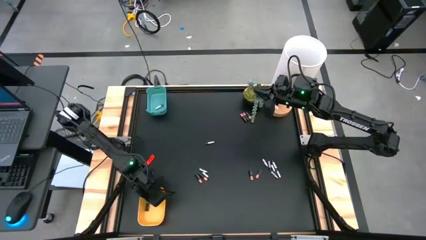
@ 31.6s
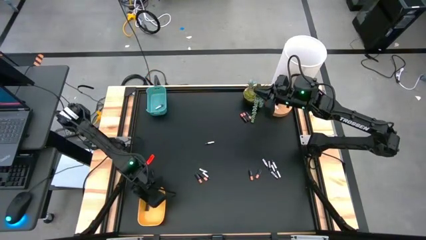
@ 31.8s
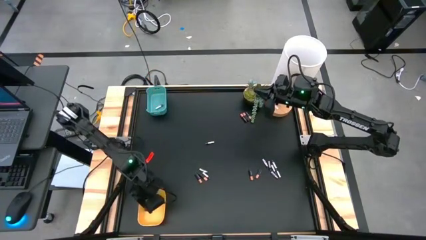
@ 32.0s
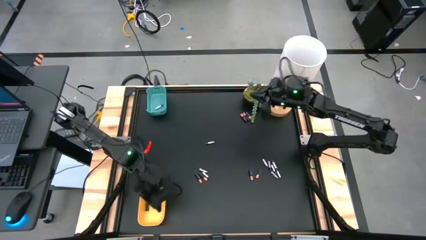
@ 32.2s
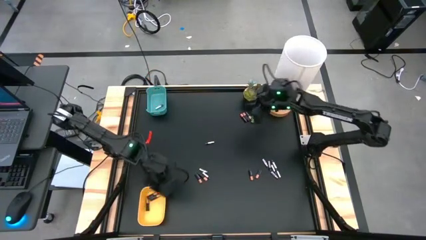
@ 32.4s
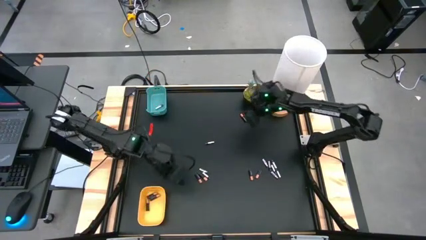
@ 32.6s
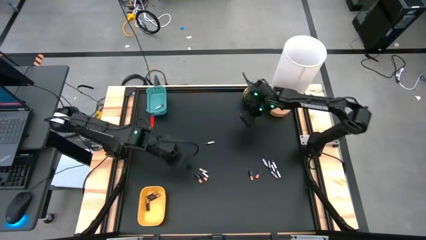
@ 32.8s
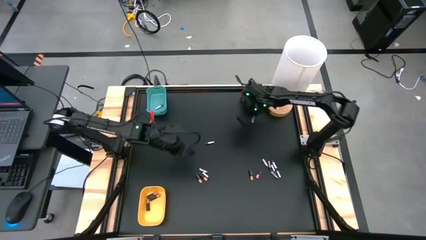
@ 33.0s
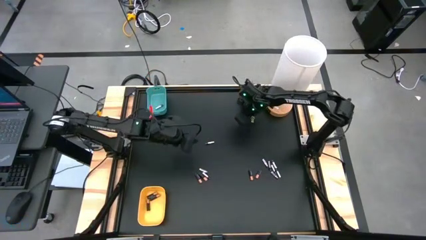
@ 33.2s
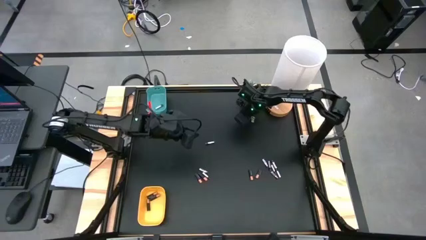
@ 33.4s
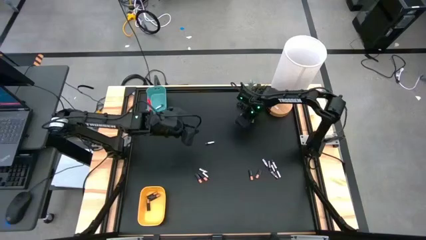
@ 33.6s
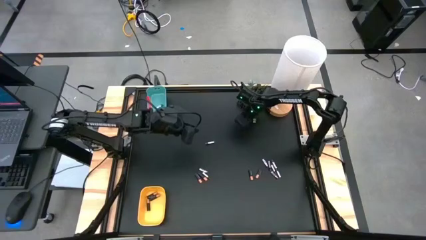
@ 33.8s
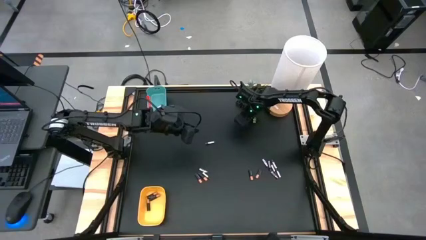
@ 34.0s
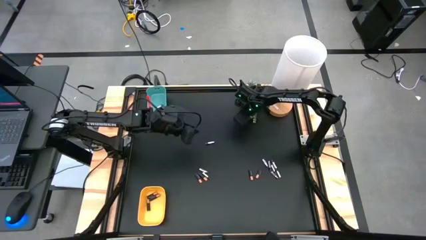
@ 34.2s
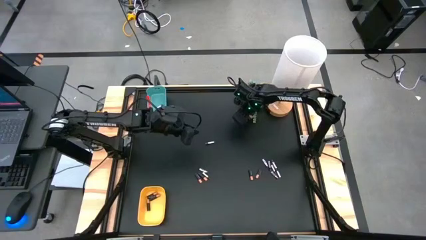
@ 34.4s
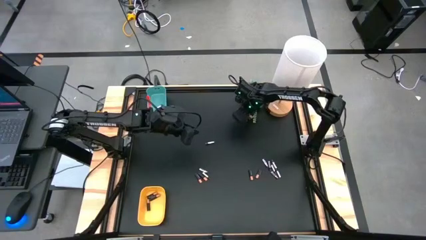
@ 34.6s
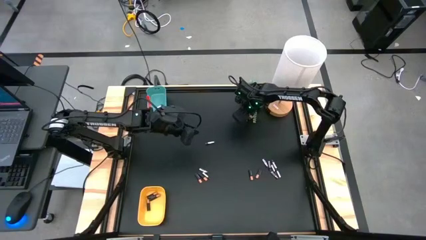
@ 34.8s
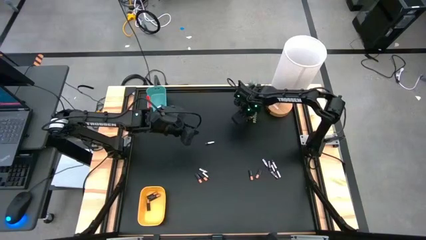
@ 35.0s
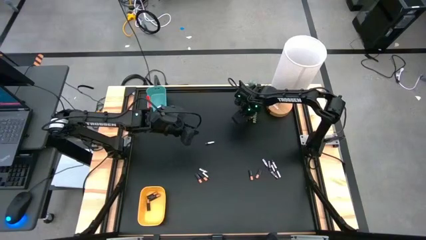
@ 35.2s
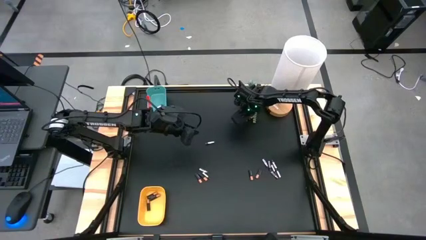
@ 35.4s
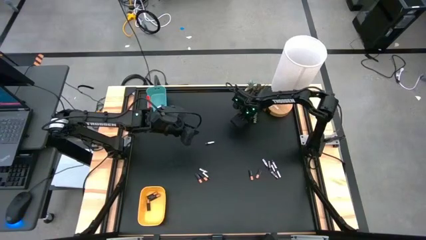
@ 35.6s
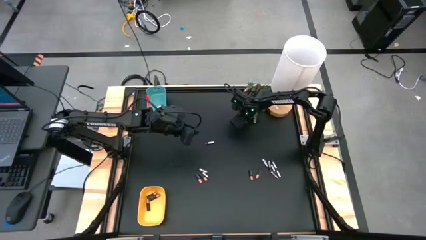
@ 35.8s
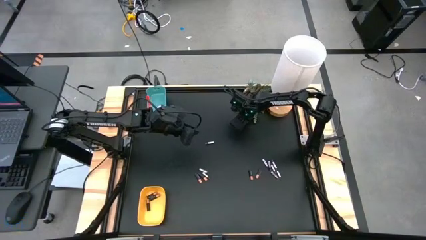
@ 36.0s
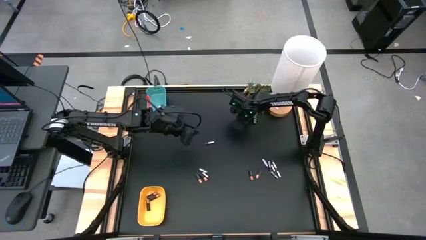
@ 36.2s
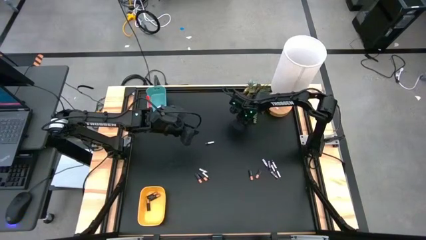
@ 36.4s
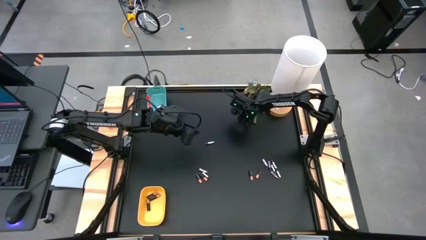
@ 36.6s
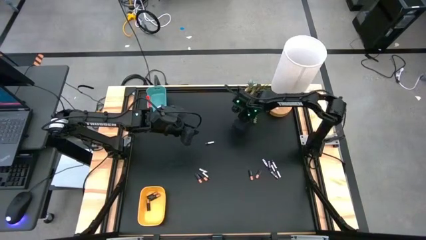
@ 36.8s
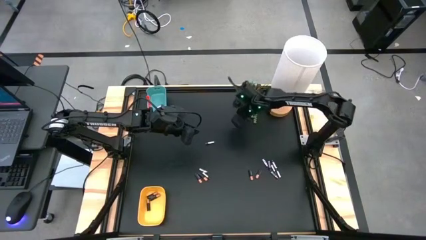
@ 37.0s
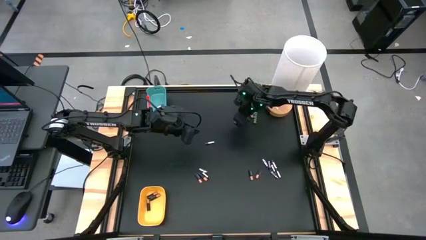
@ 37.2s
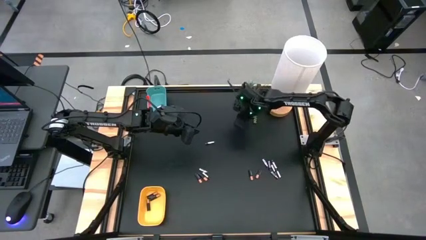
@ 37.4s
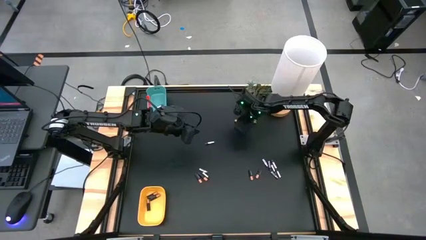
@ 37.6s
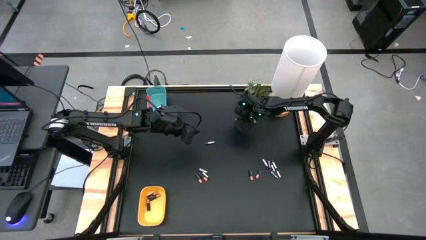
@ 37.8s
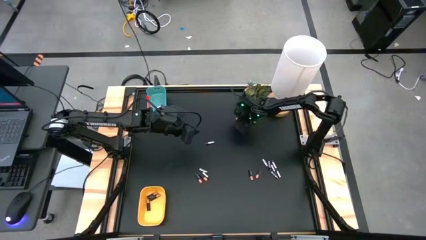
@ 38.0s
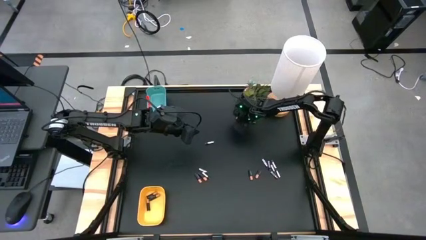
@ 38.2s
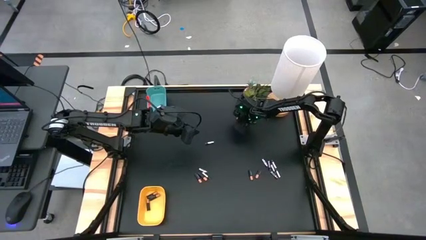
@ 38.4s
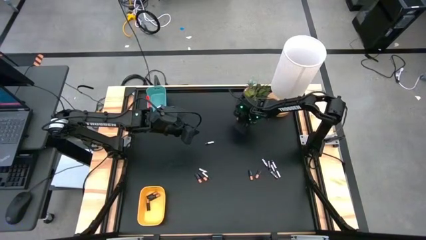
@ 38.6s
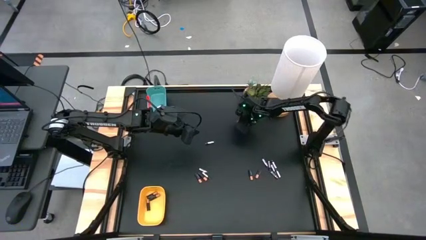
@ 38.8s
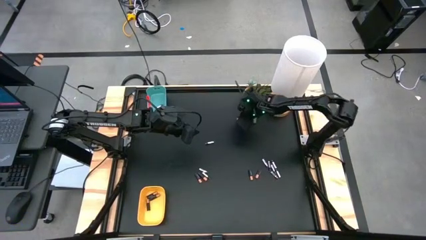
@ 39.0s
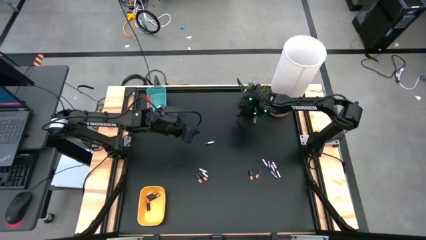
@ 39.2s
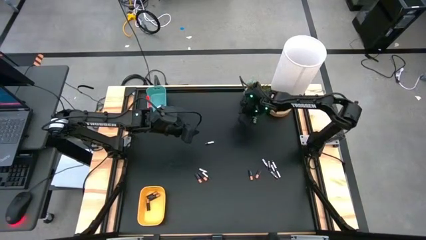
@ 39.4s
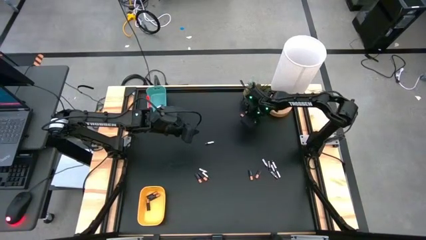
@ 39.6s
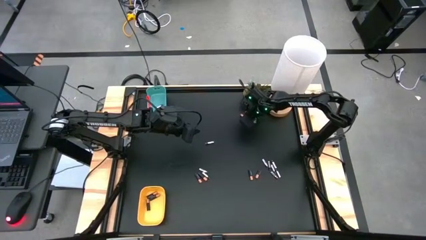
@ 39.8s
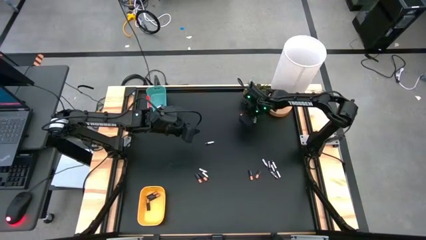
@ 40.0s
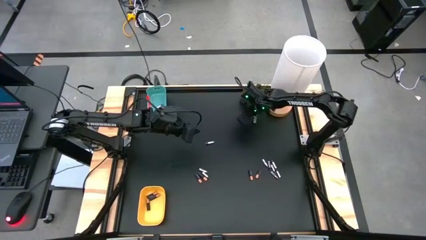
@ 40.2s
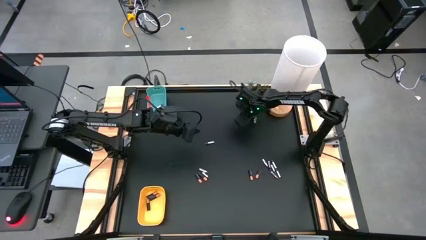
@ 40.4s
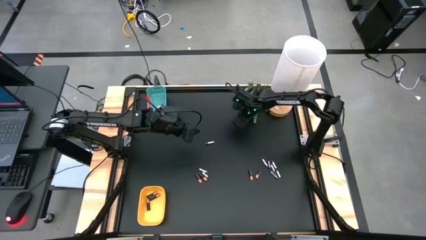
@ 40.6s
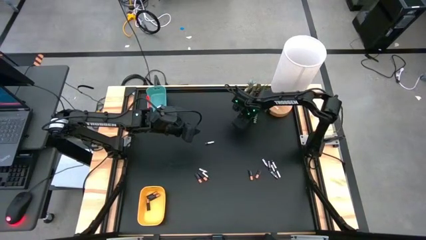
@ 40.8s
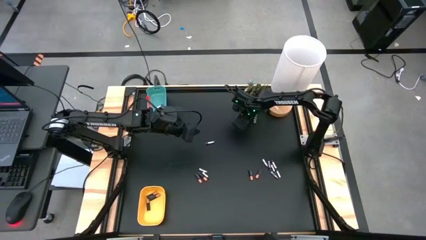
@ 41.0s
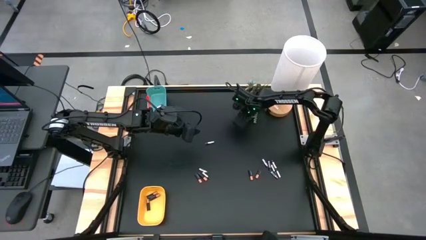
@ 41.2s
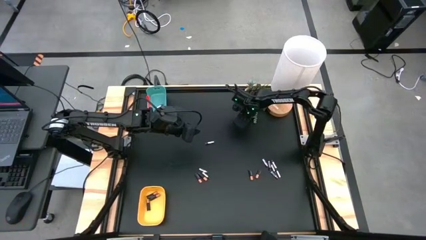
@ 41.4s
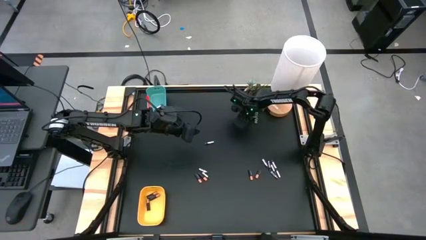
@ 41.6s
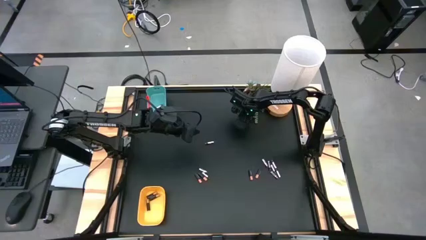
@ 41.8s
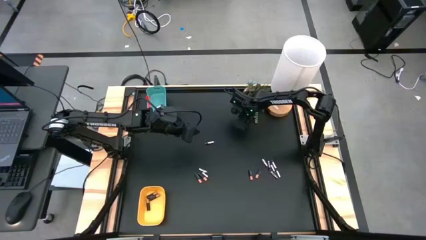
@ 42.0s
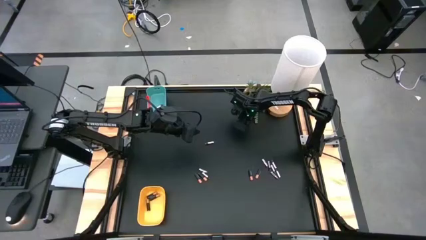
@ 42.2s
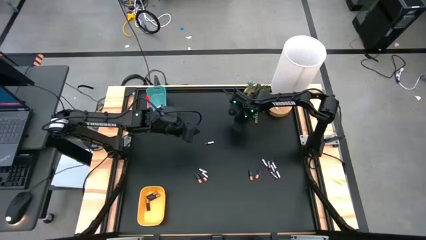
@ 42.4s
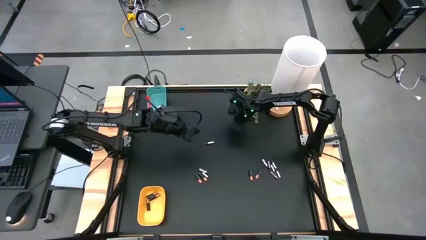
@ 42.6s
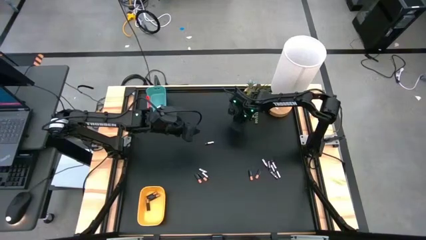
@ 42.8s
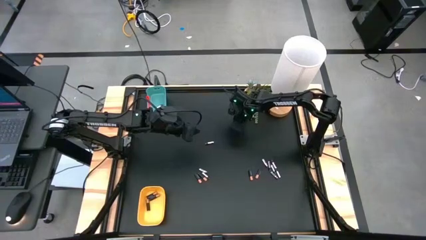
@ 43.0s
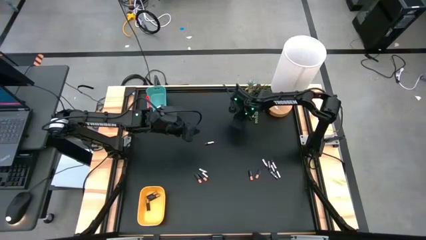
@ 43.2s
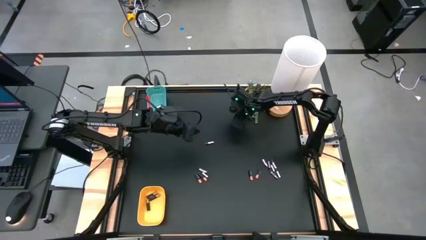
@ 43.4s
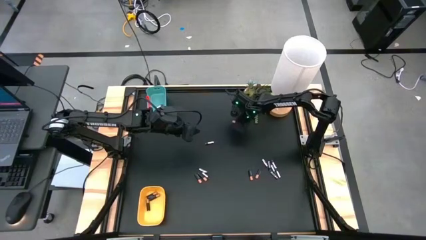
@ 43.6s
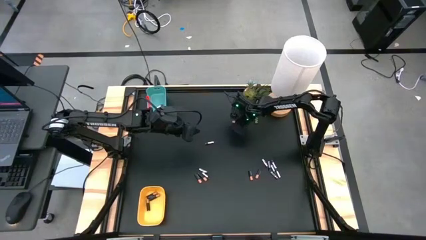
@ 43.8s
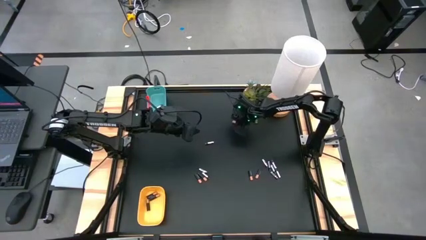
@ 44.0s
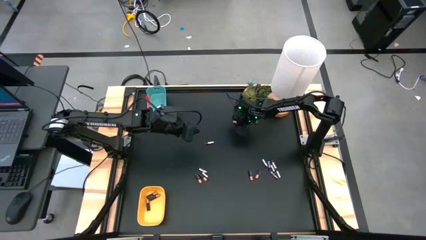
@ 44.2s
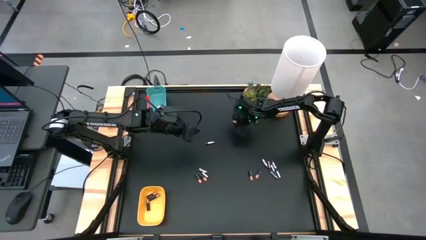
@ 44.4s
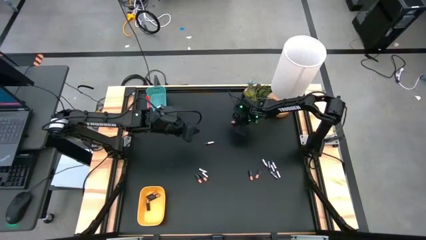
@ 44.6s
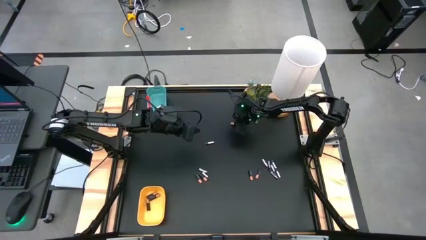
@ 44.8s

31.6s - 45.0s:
Task: Sort batteries
Put the black battery into the yellow bin
